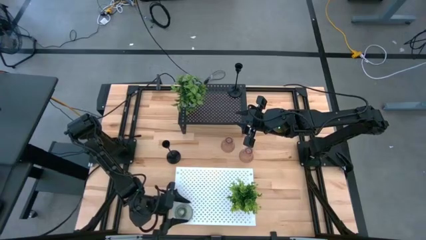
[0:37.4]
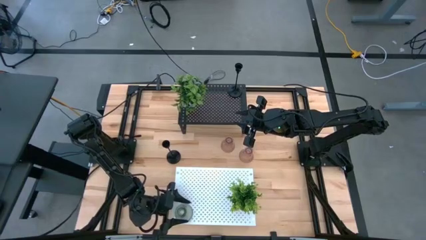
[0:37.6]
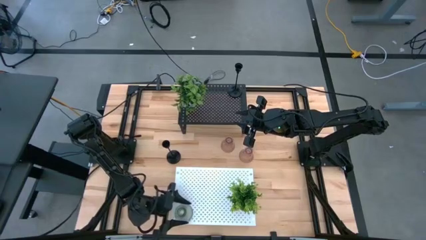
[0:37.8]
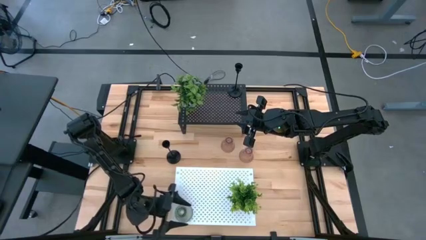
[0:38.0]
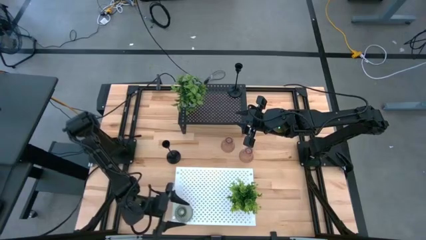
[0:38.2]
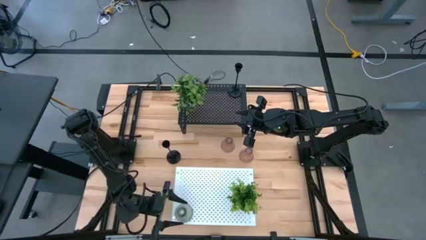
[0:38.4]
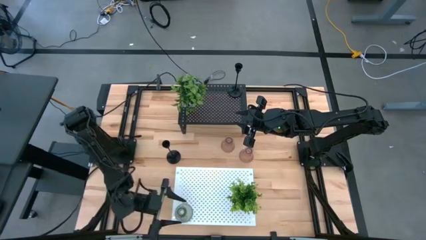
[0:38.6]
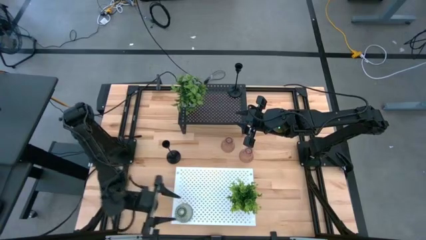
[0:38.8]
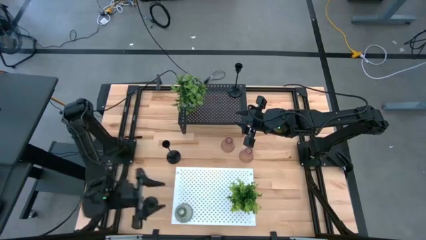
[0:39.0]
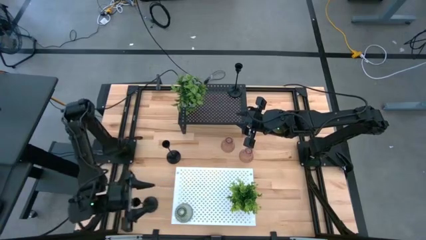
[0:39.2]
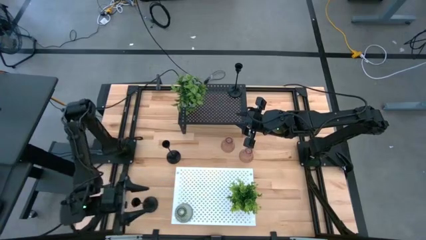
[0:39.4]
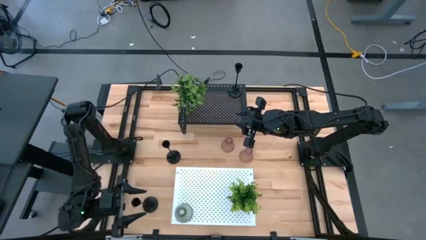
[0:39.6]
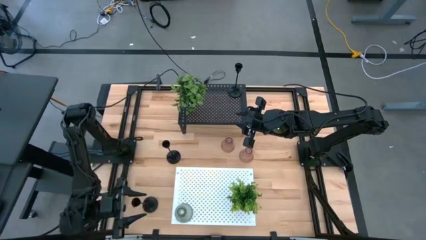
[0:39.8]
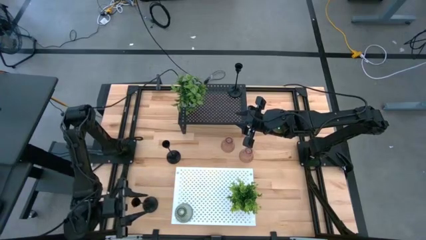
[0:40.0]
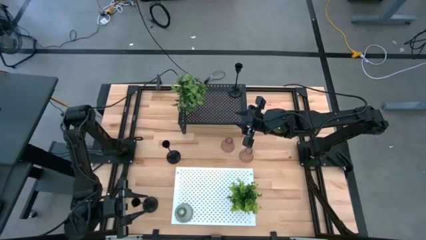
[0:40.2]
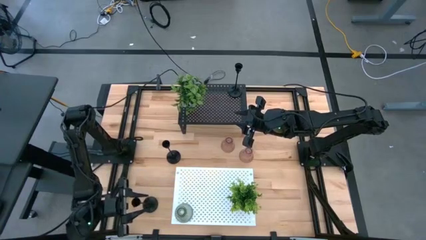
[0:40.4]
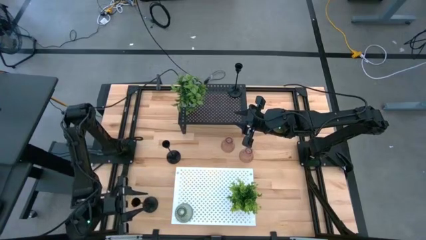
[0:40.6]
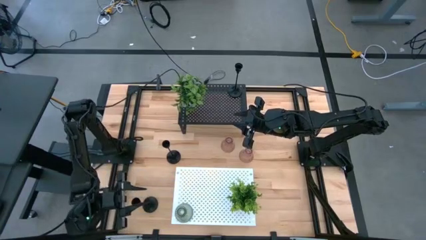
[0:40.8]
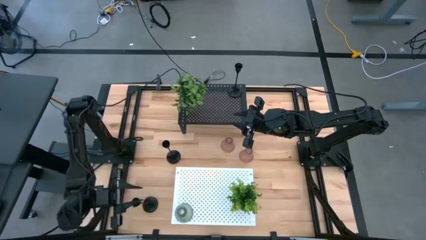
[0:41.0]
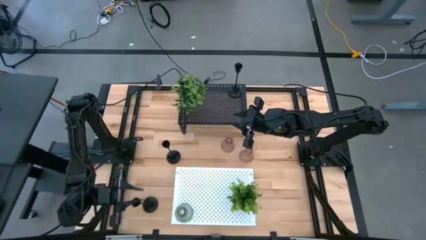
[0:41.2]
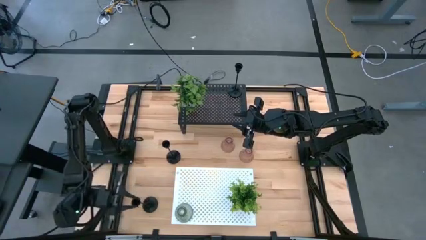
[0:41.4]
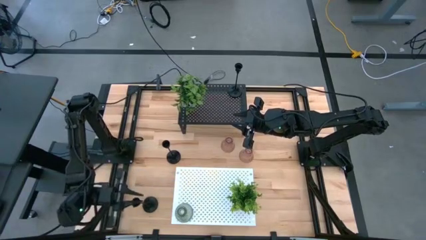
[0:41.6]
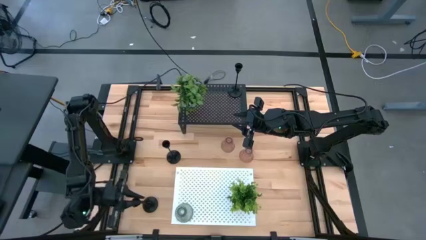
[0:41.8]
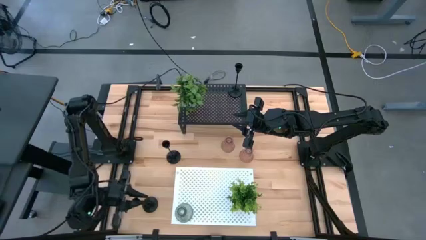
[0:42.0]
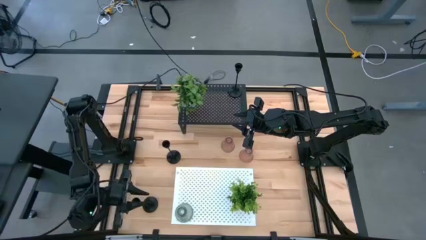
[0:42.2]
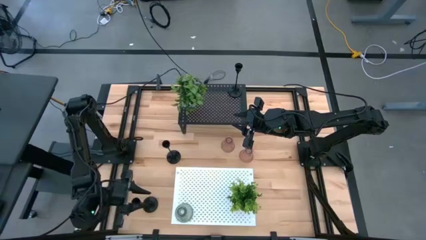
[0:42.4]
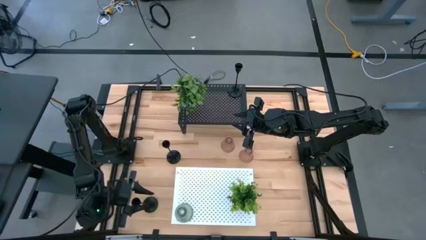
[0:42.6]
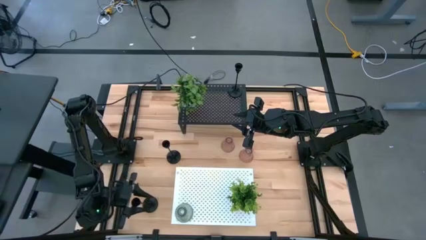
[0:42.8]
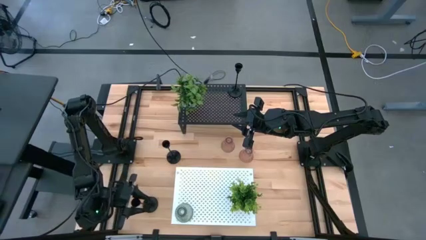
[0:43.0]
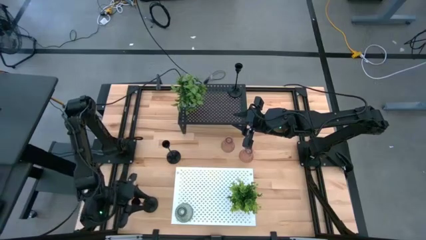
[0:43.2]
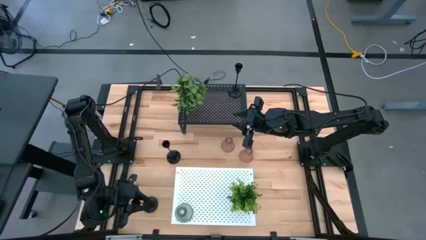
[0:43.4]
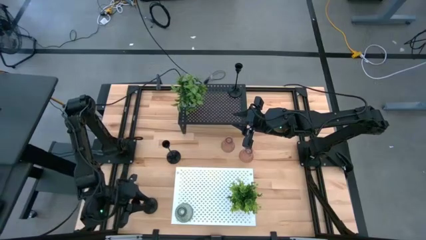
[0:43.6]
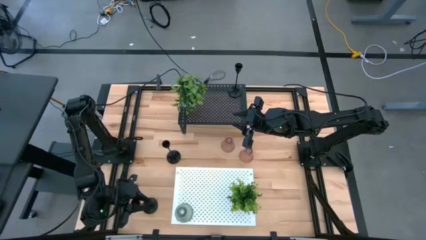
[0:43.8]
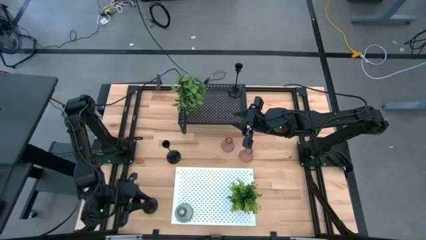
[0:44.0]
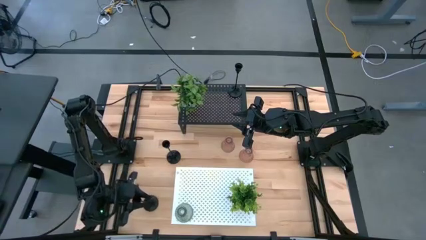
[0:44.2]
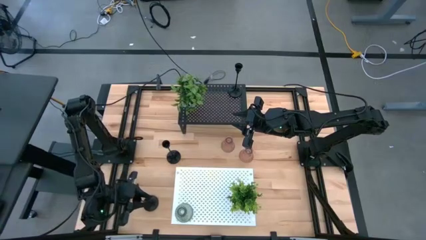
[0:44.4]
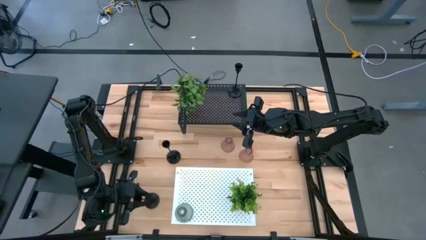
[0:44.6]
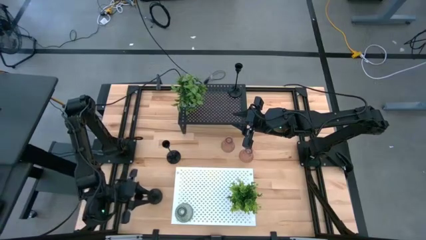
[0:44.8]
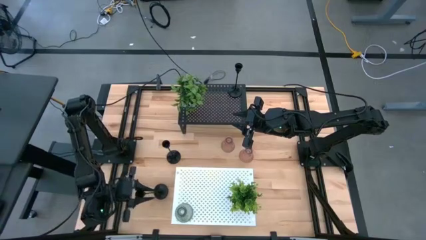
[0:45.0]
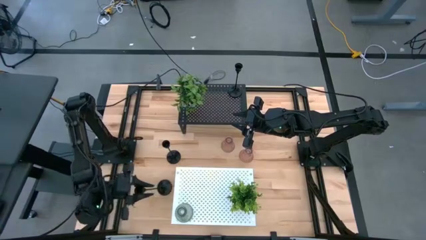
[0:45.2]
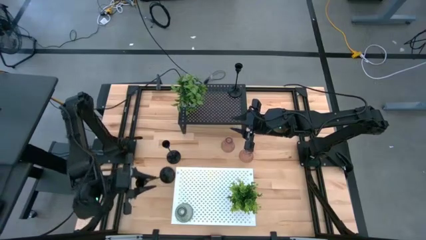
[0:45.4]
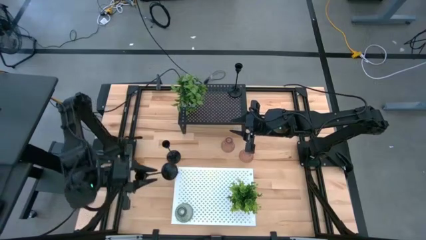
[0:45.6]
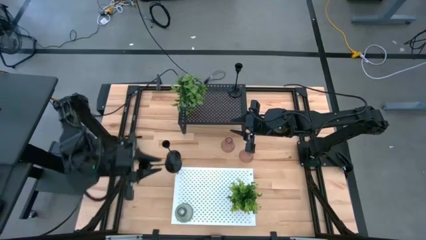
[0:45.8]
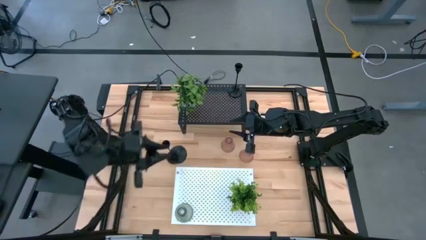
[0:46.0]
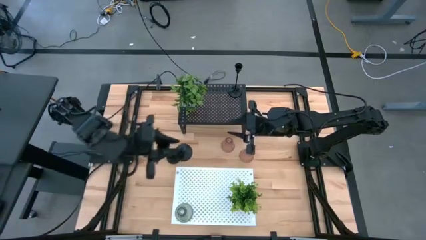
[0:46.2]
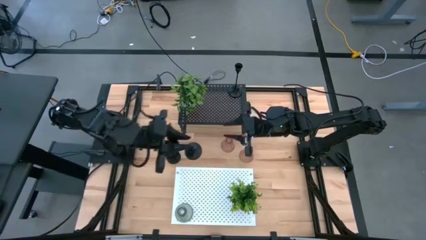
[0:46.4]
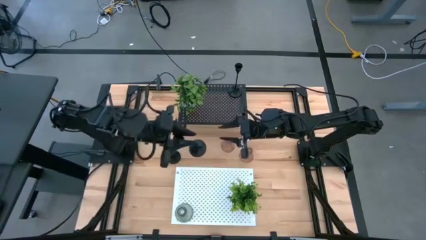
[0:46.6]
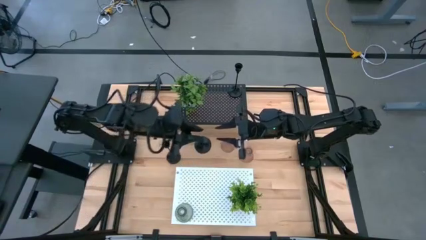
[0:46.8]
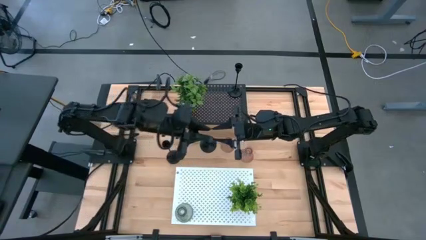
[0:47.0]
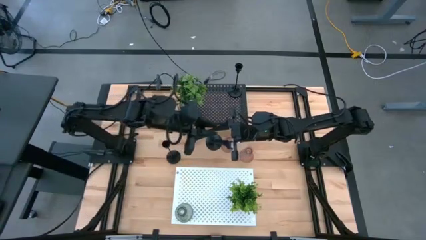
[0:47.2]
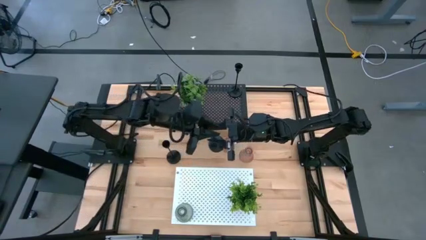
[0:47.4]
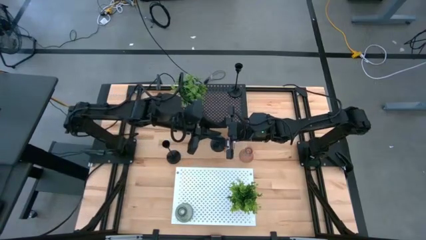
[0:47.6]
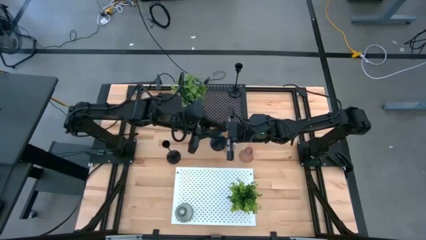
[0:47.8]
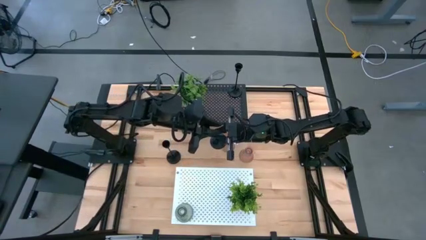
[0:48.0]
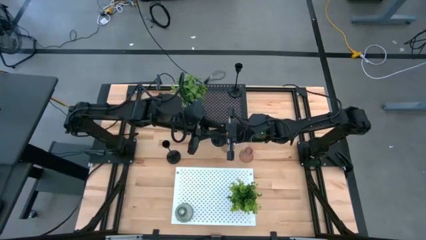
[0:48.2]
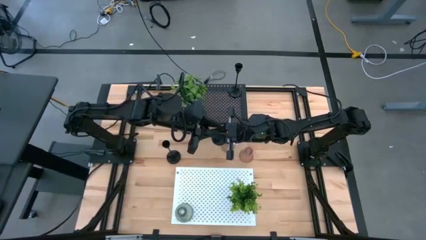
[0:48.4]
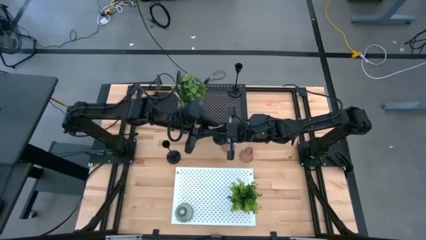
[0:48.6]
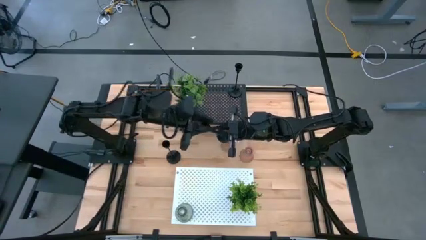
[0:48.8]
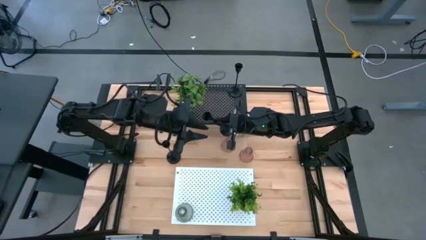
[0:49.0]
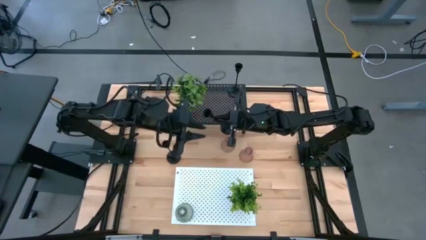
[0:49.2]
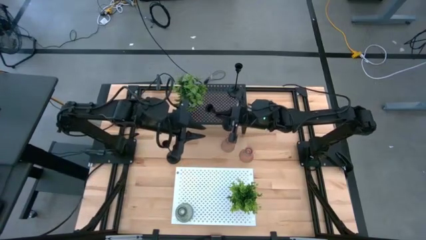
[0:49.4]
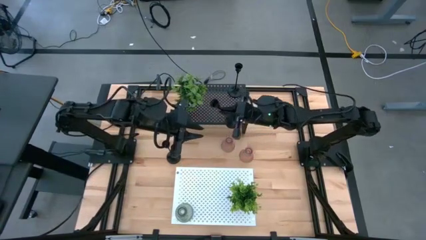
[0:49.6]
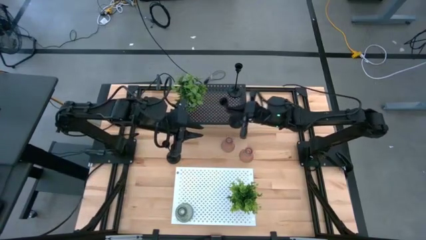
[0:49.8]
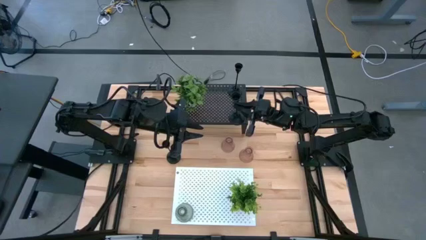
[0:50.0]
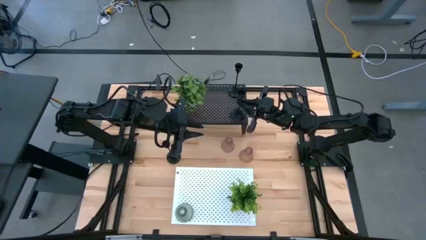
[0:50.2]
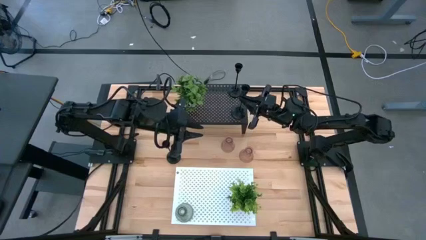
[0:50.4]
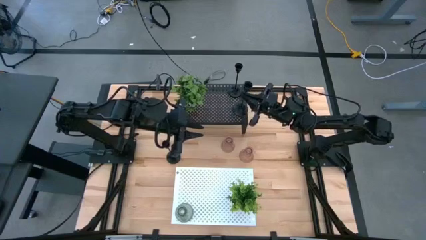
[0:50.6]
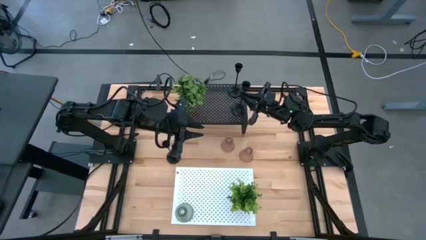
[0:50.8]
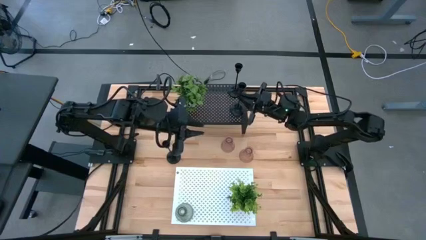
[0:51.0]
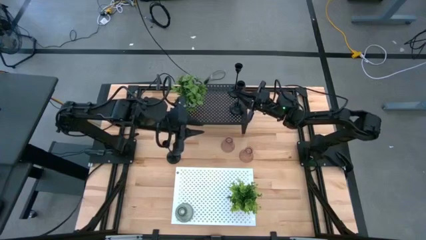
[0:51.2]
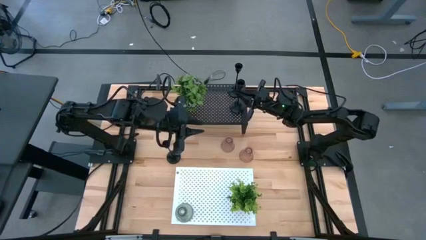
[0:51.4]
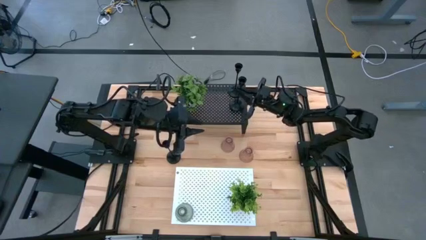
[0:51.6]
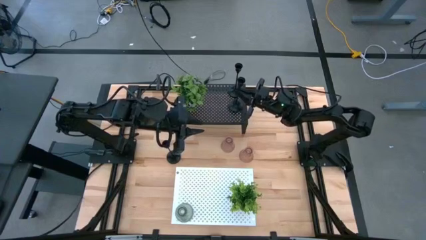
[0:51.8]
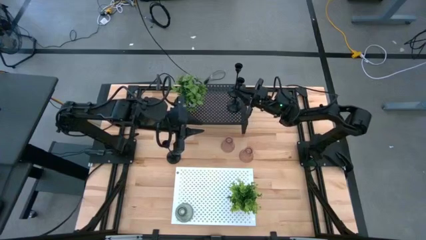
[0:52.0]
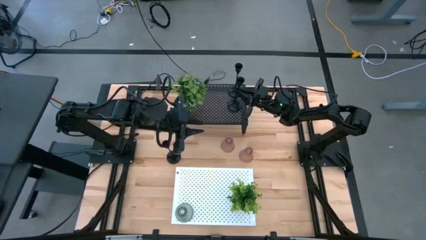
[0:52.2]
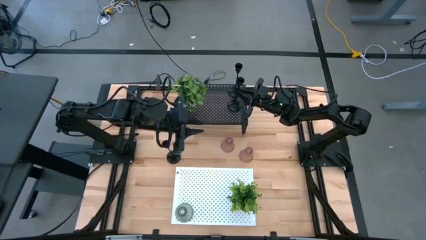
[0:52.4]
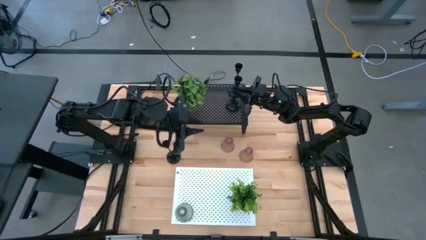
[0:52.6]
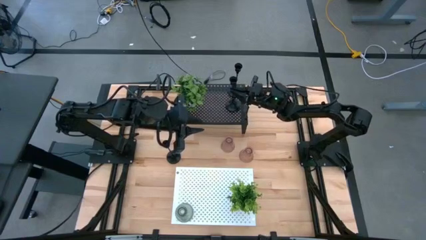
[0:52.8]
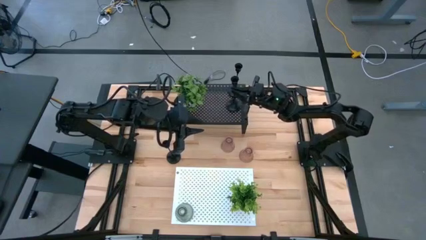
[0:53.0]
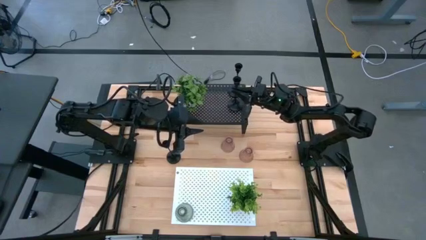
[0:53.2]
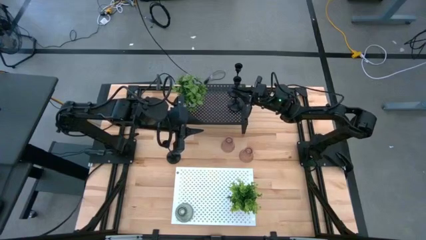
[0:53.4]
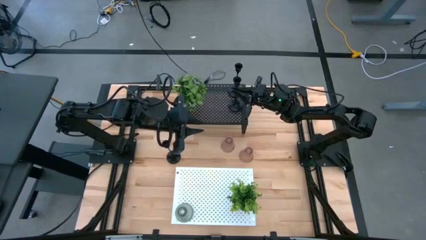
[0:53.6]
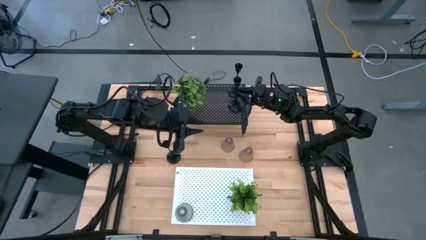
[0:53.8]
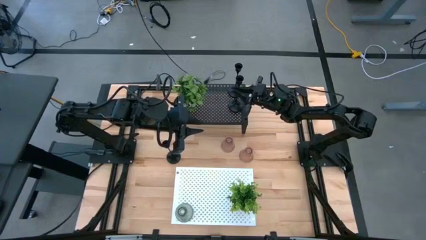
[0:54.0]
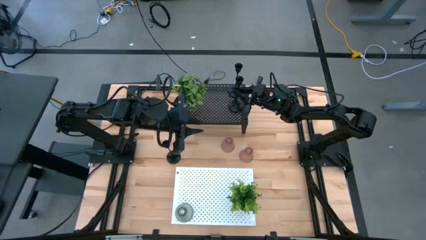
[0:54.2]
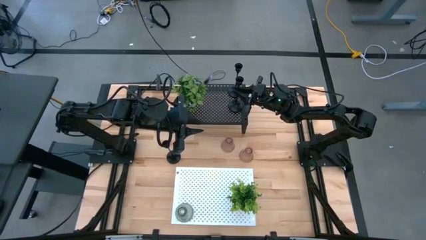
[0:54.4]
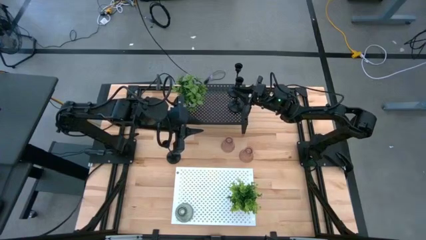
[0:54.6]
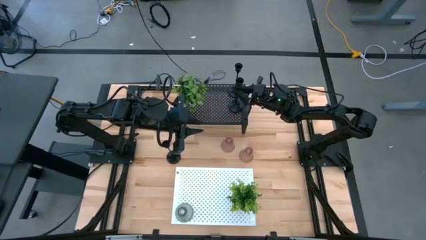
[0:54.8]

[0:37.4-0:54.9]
Task: Pick & Place candle stick holders
Put the big black candle holder on the black shelf aligned with the other big black candle holder
